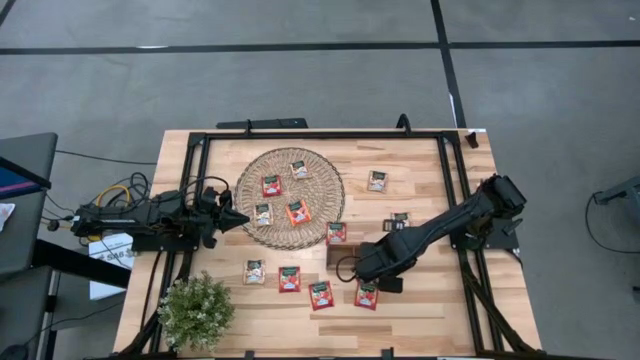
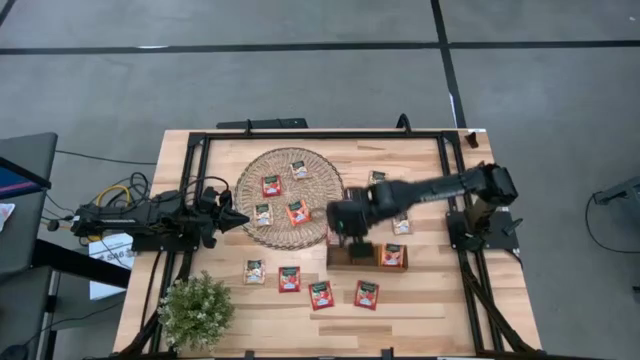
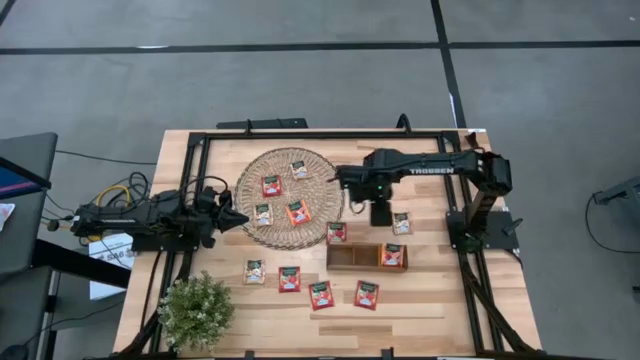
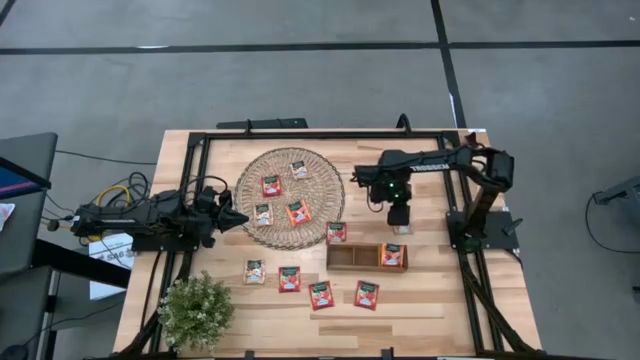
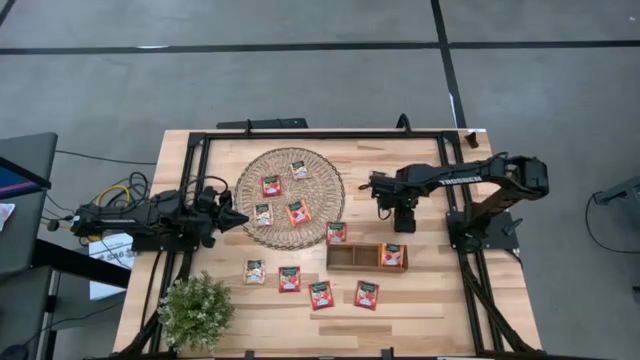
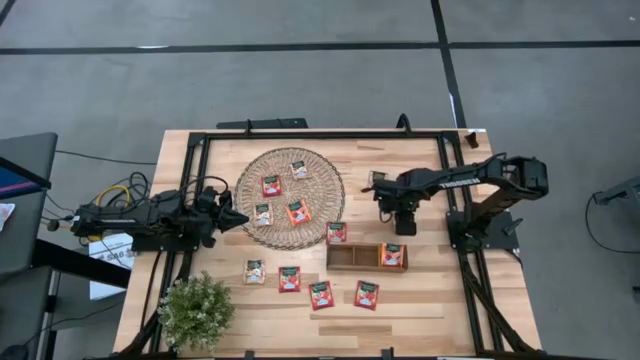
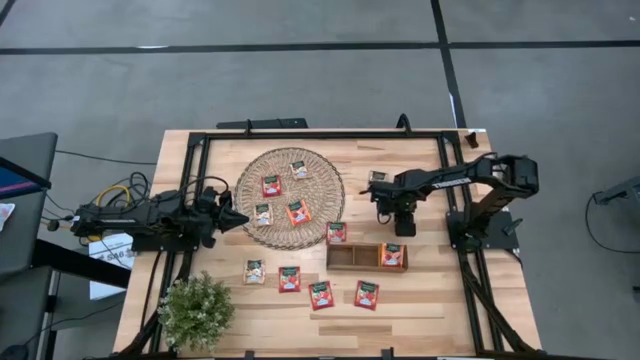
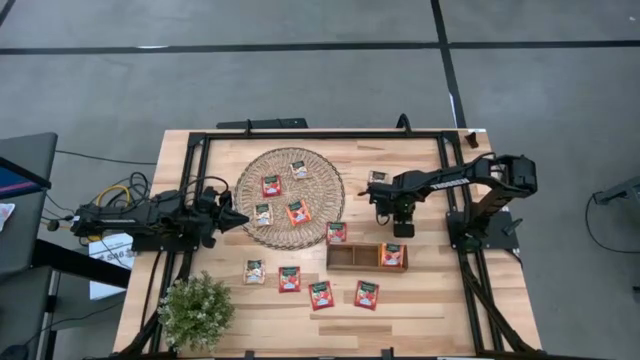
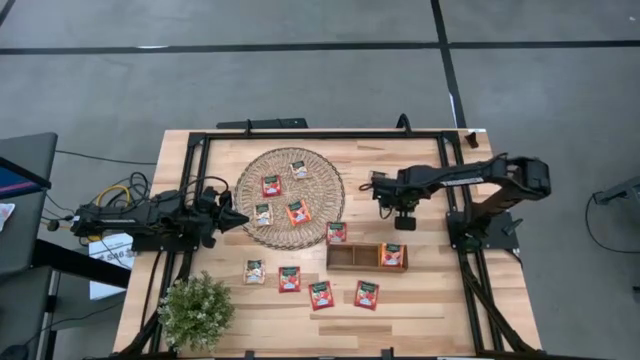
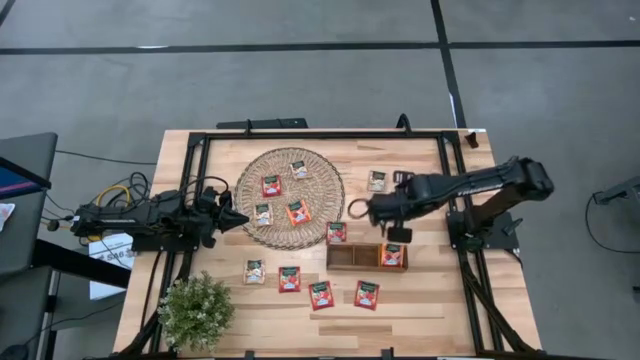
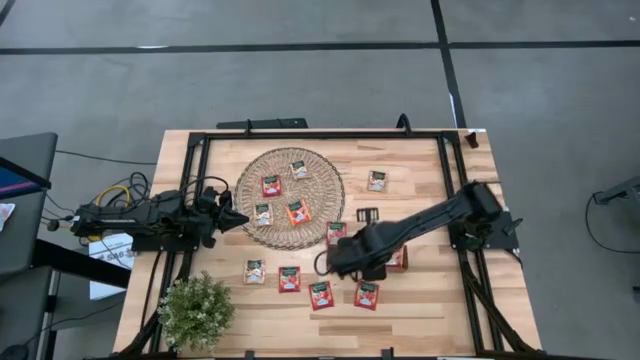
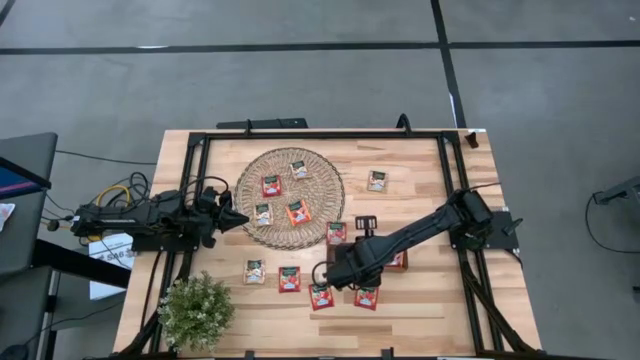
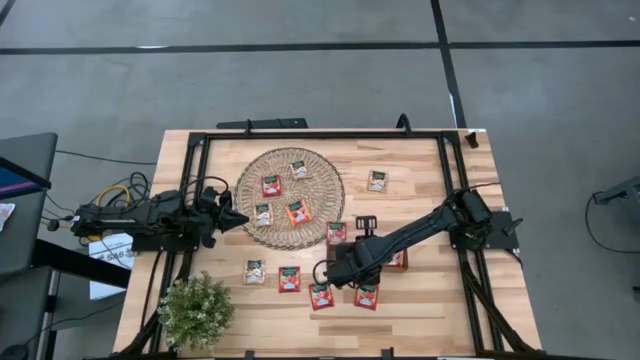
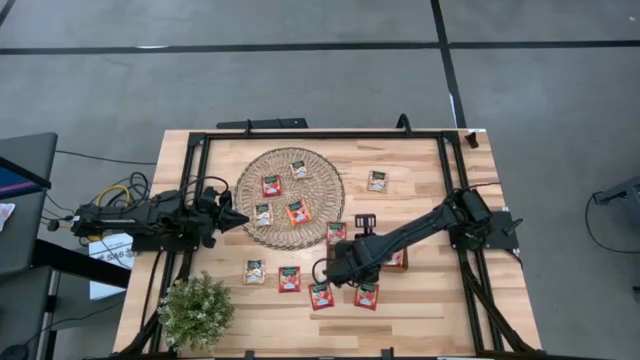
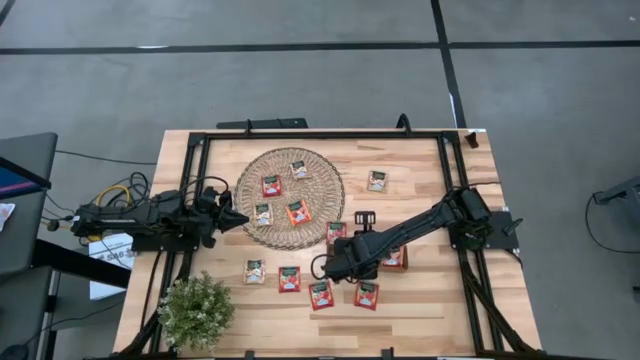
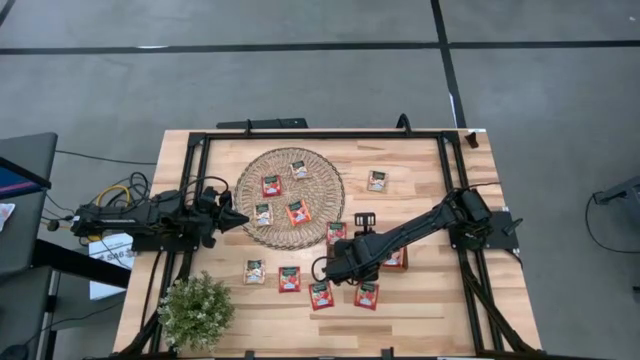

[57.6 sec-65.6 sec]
Task: Pick & Place Tea
Put the brown tea bag into the middle section of the wooden organizer

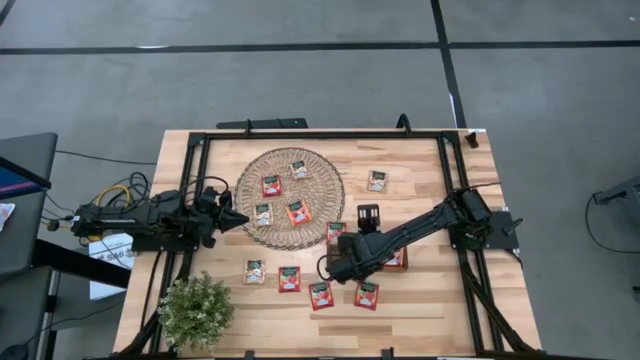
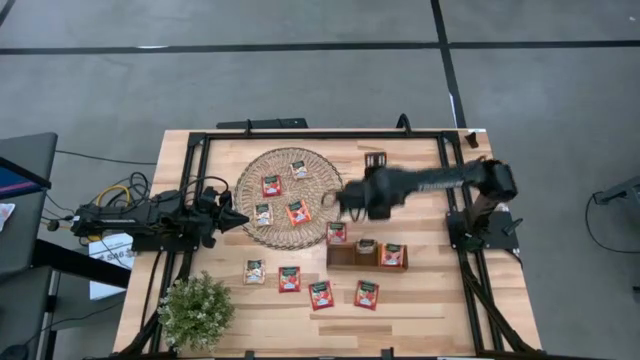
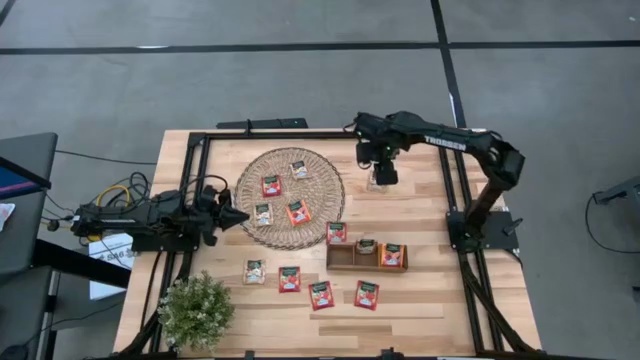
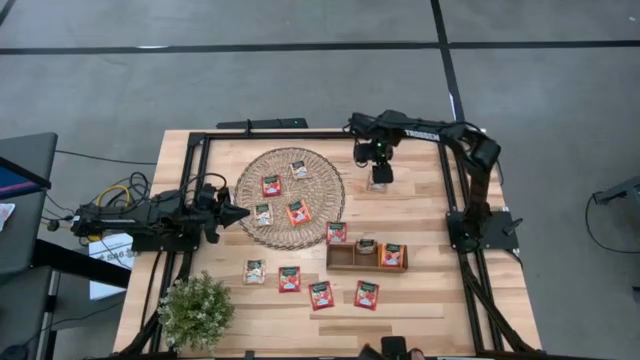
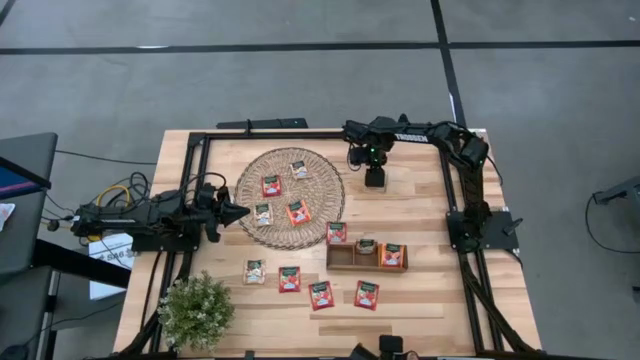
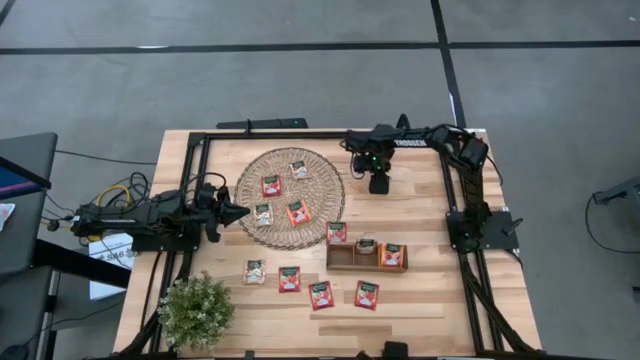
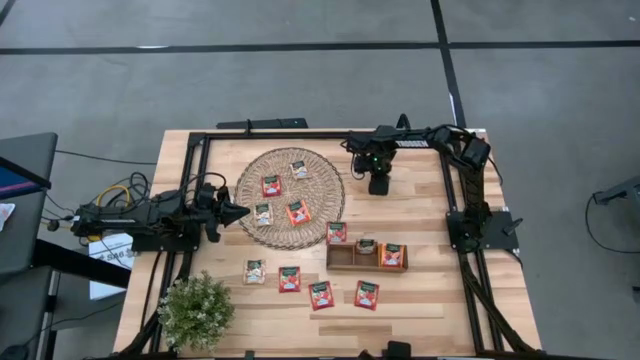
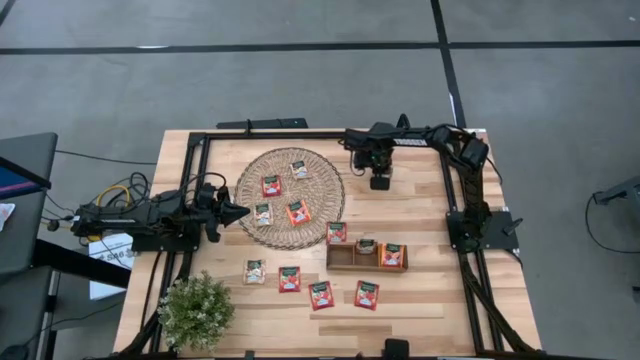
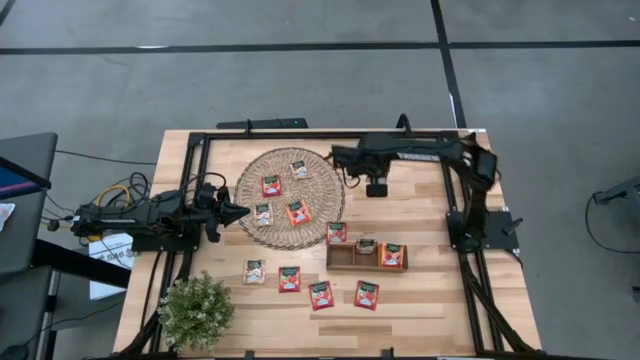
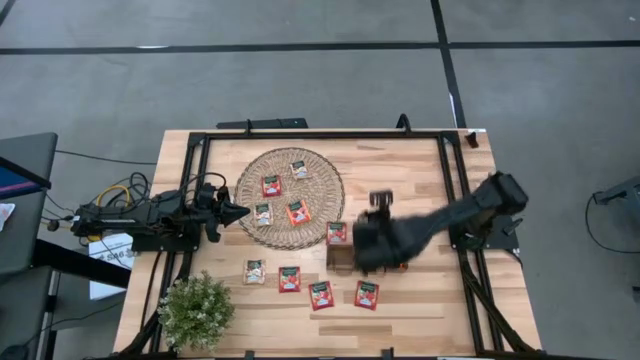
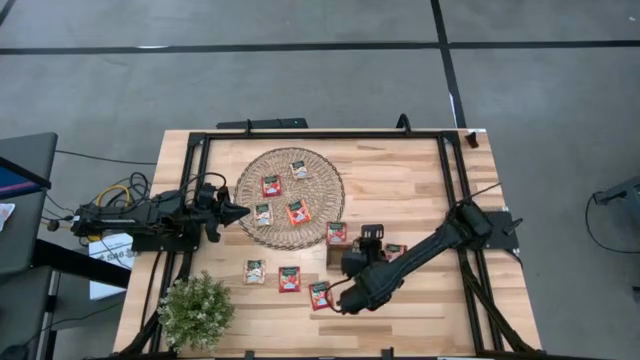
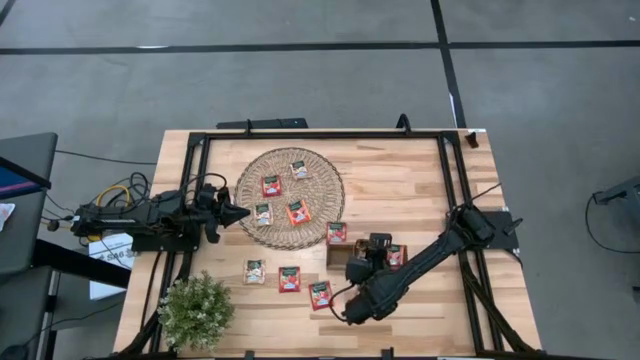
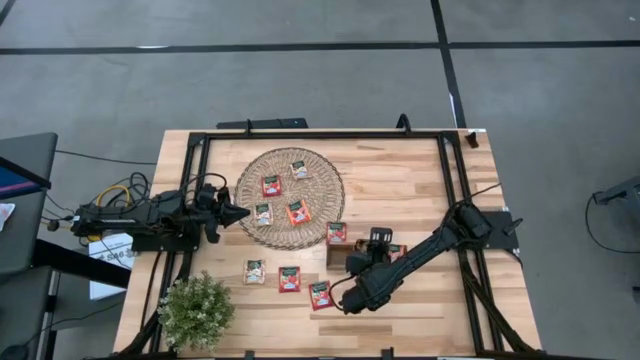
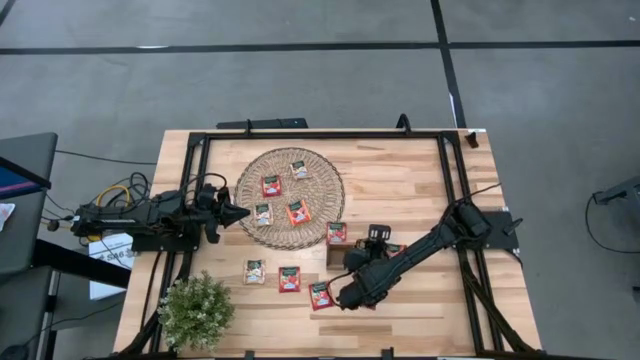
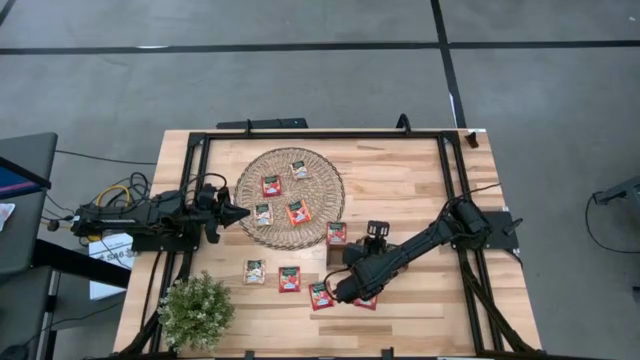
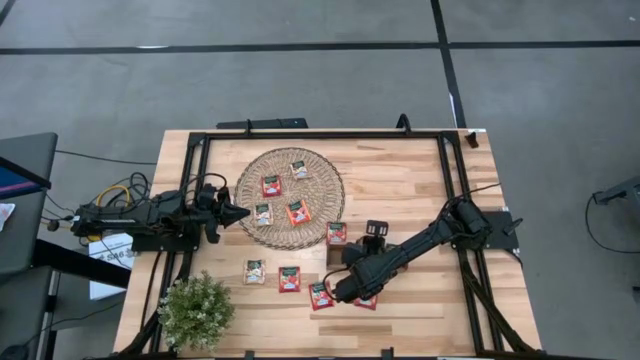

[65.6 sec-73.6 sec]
Put the brown tea bag into the middle section of the wooden organizer
